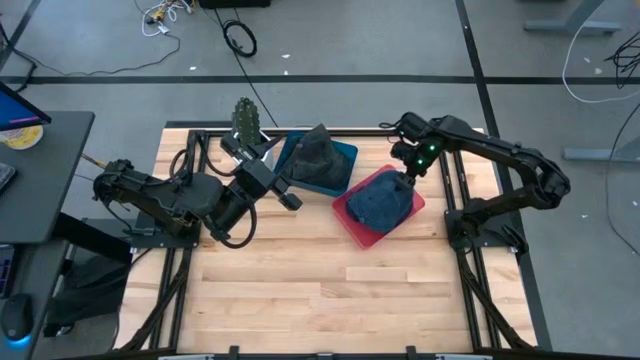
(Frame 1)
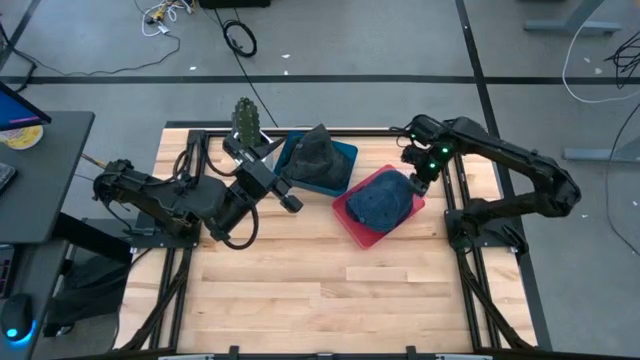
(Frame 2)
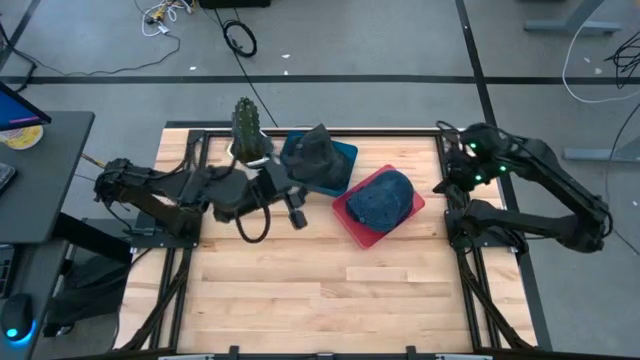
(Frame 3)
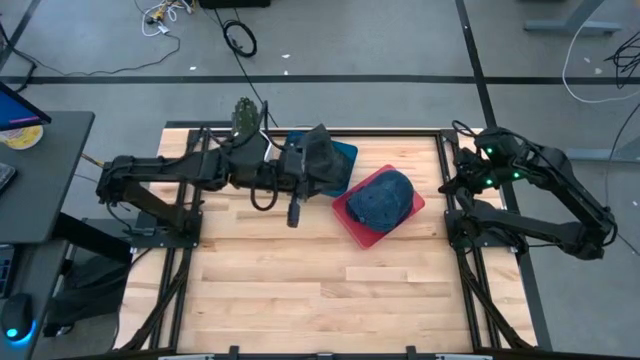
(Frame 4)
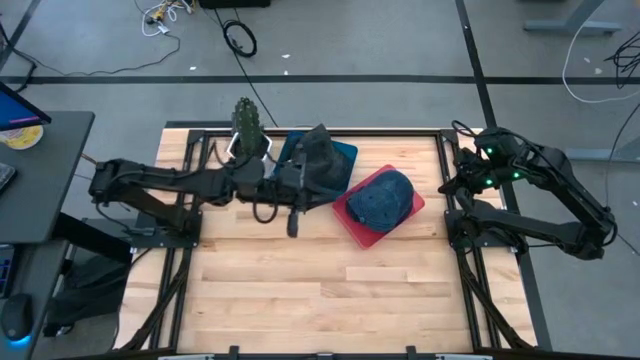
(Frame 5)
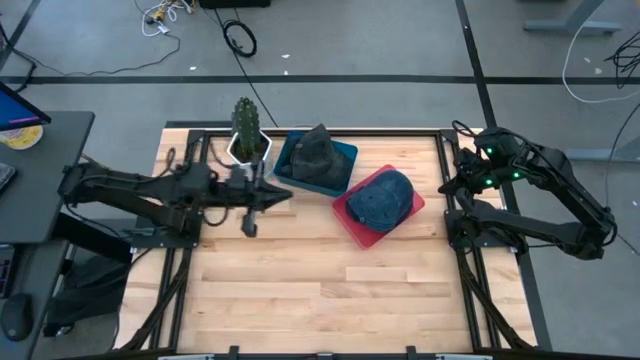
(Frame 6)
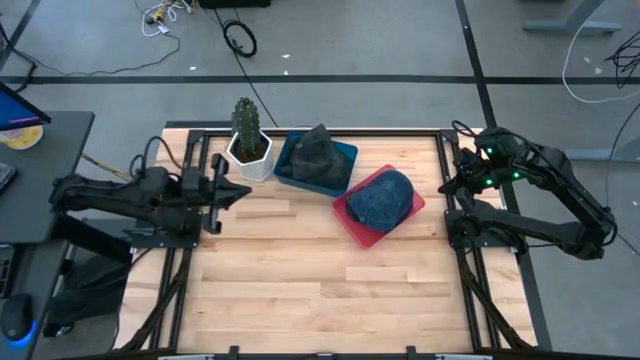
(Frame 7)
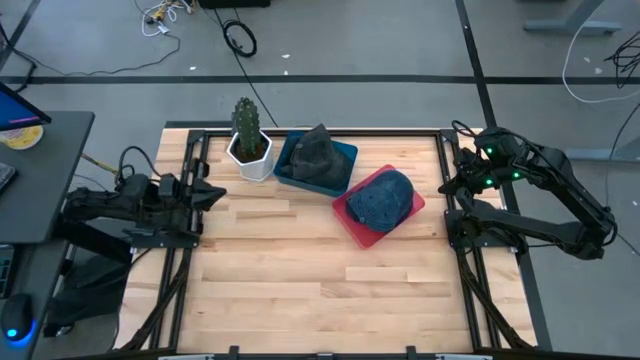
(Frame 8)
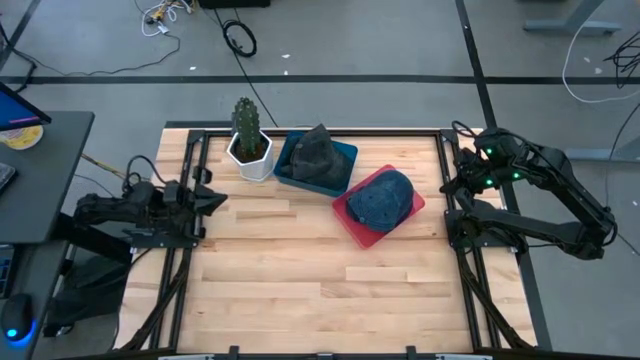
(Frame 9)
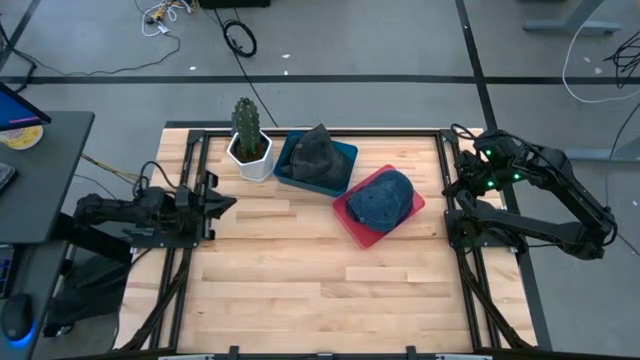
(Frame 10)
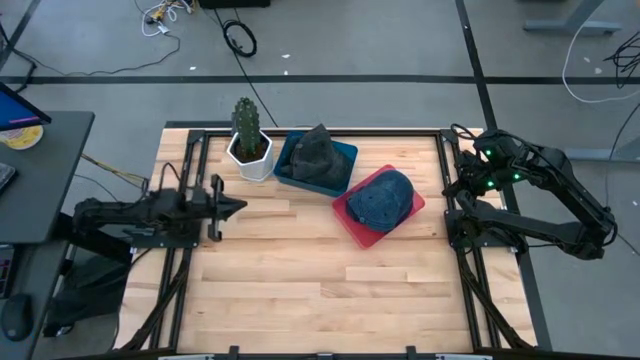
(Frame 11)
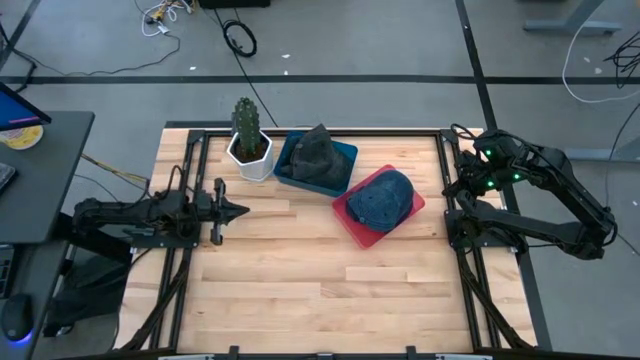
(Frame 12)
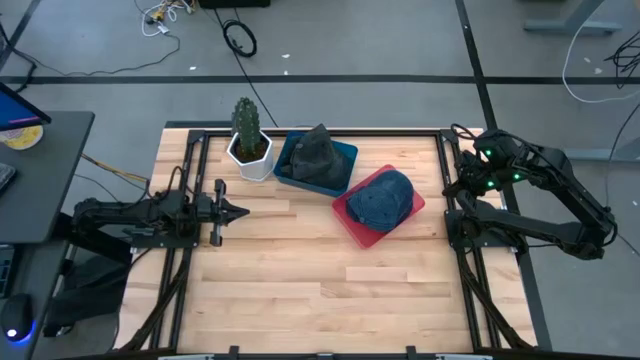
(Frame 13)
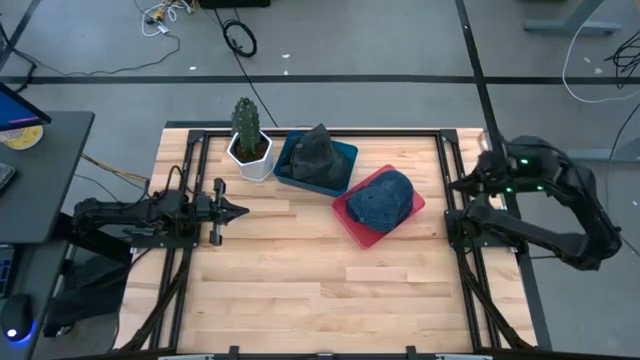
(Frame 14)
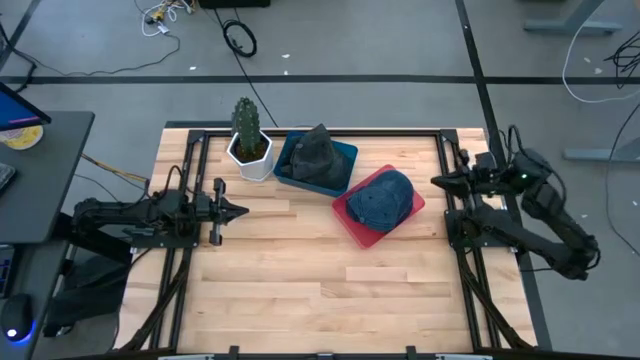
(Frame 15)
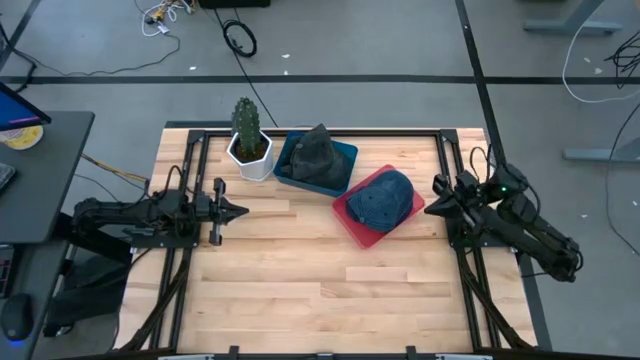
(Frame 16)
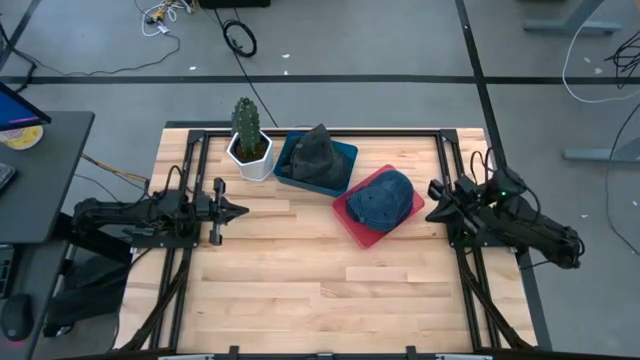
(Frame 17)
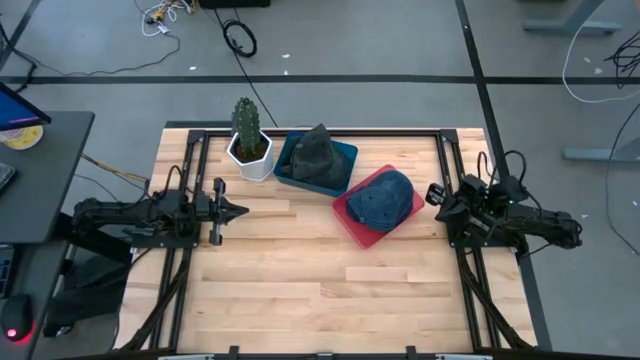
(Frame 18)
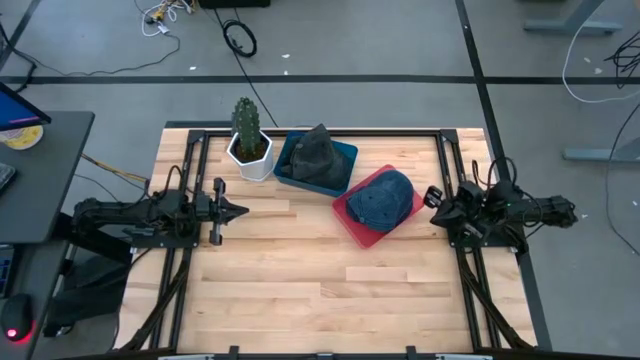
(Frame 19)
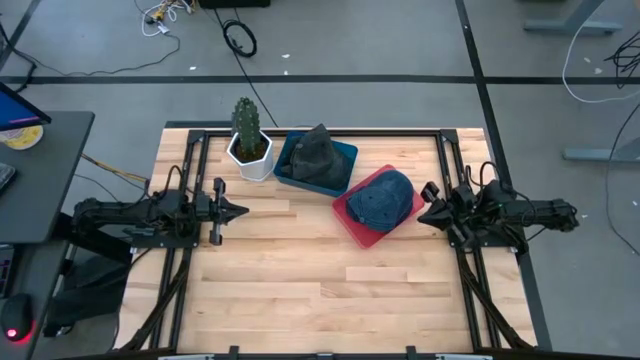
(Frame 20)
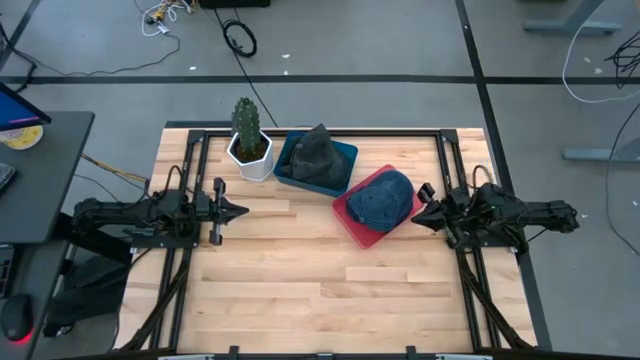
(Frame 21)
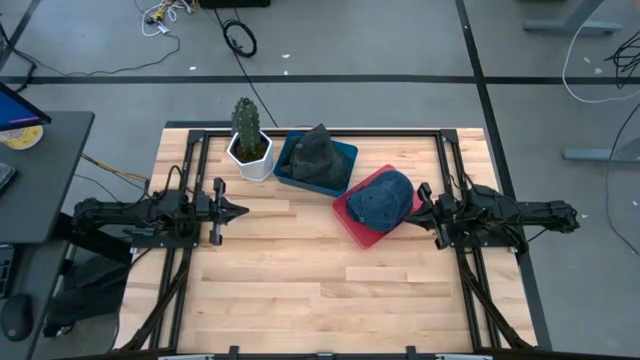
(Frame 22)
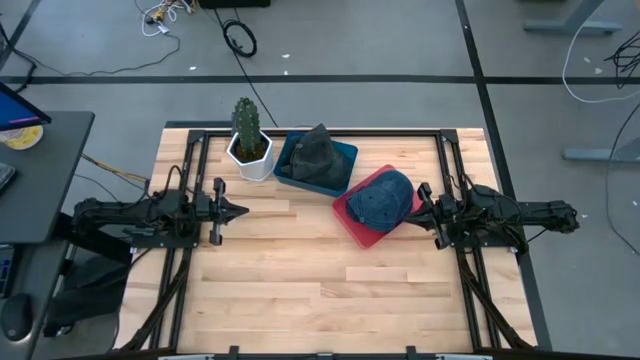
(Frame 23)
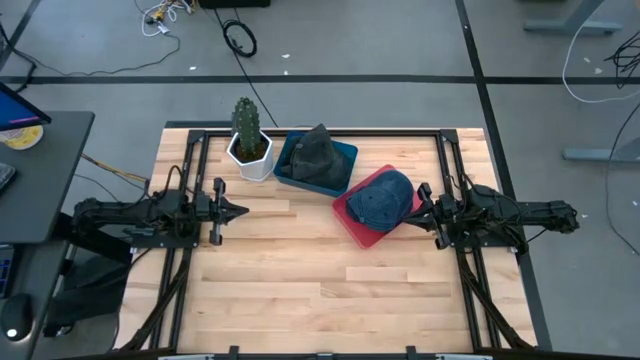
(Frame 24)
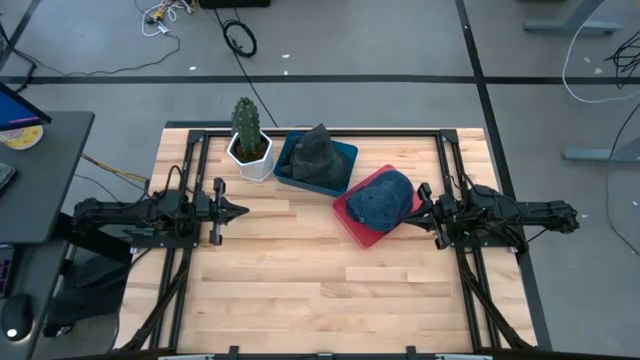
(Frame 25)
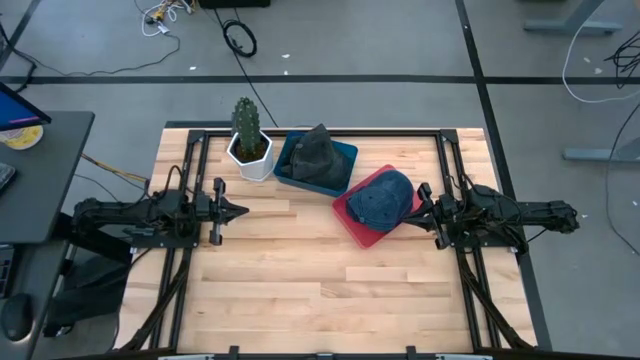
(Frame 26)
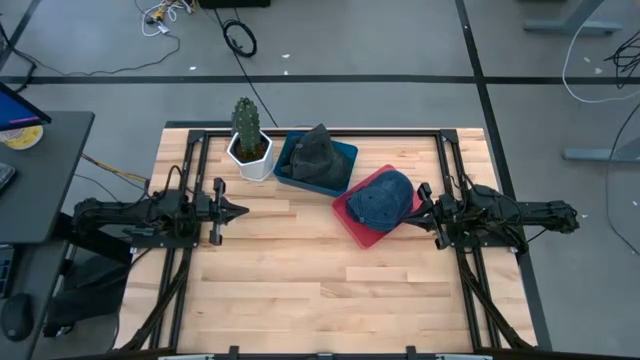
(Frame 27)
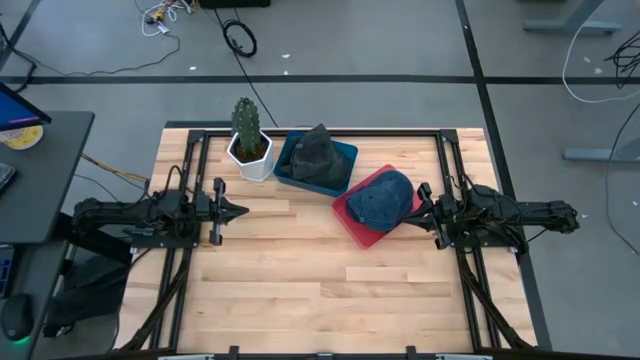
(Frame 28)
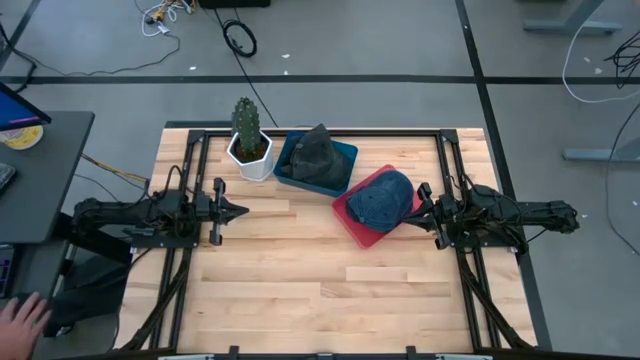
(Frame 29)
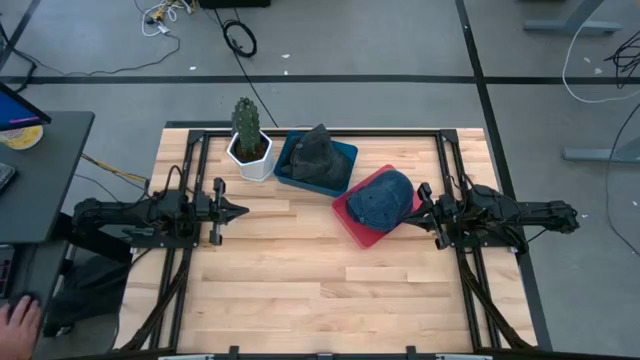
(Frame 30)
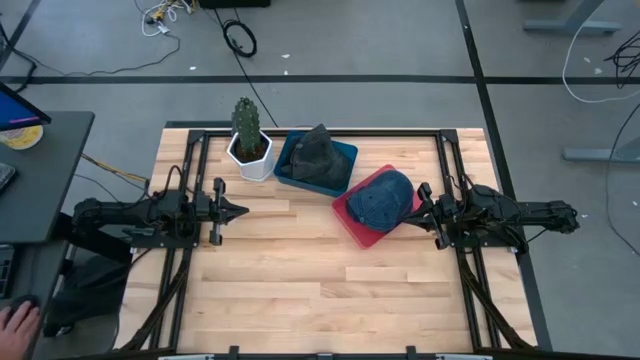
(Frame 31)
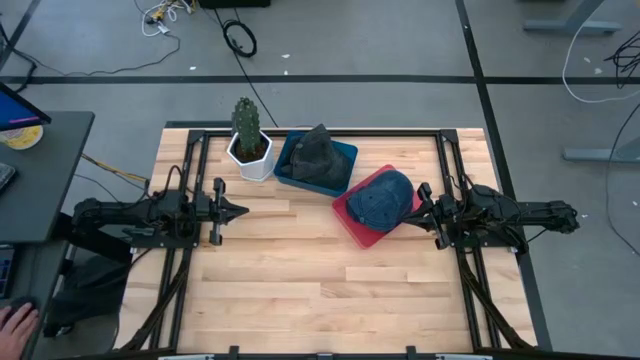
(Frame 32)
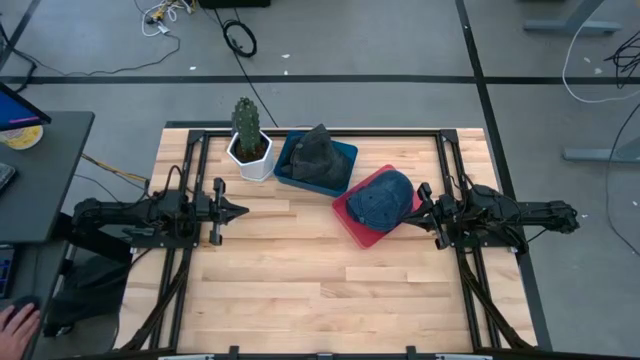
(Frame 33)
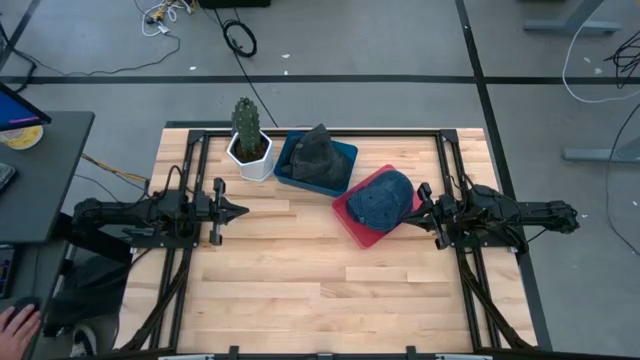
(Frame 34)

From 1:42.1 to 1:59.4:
Task: Pick & Place hat
Return to Home Position

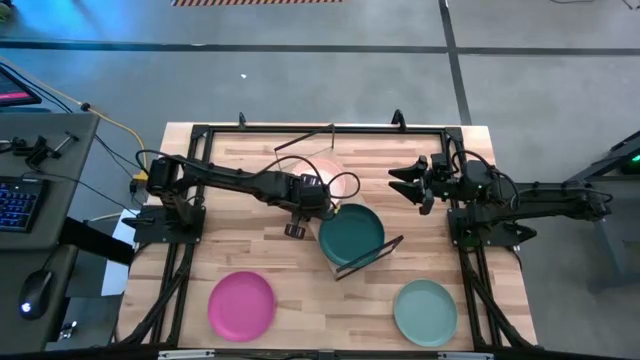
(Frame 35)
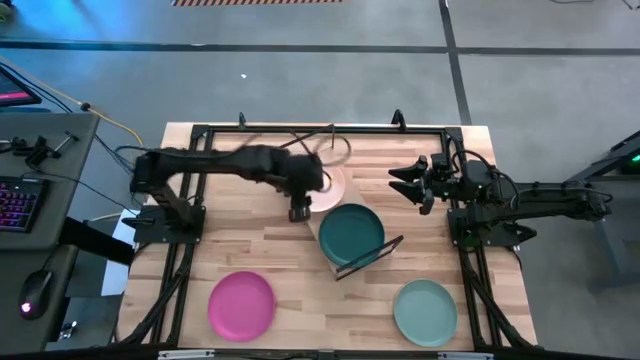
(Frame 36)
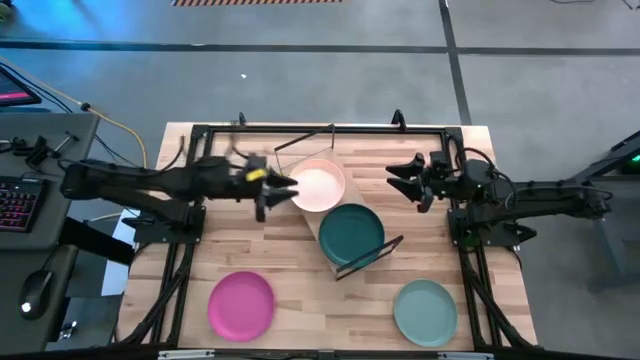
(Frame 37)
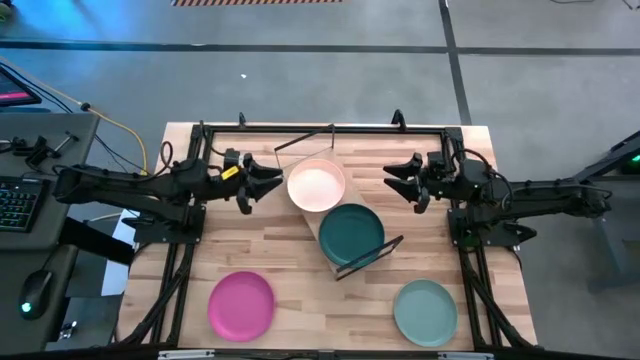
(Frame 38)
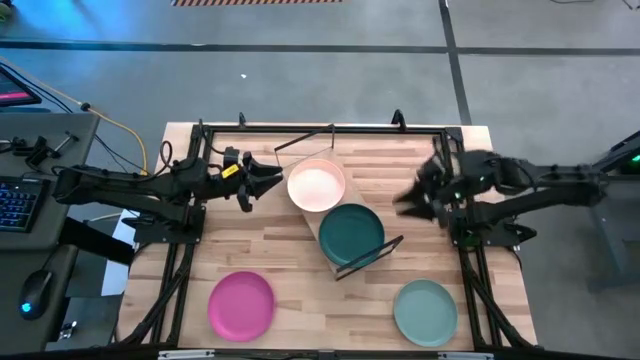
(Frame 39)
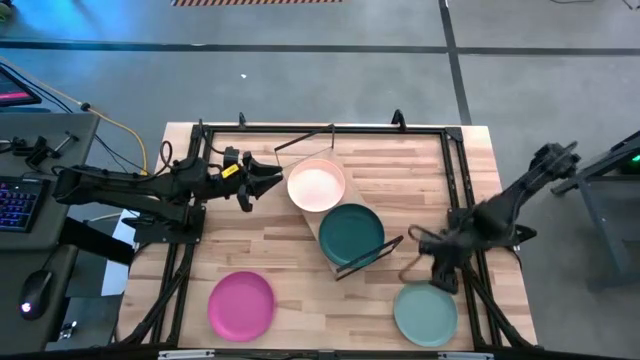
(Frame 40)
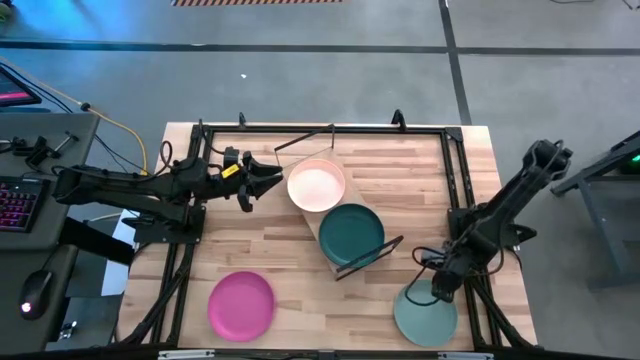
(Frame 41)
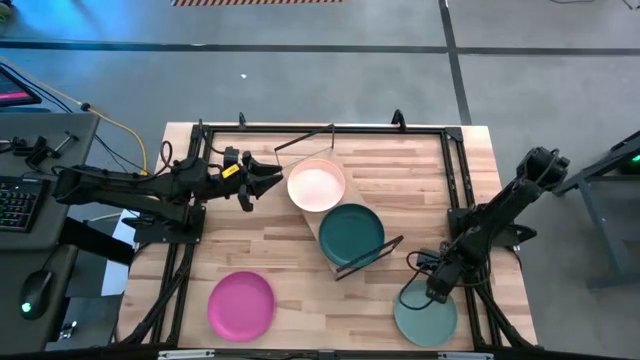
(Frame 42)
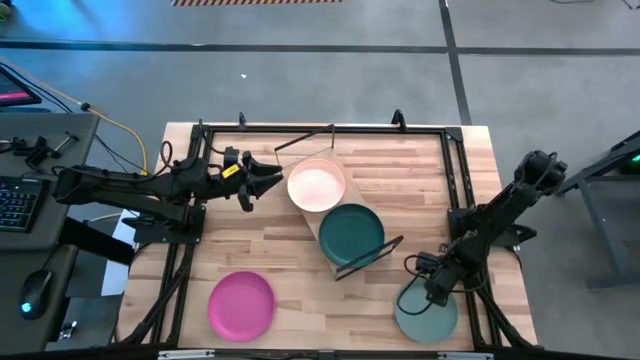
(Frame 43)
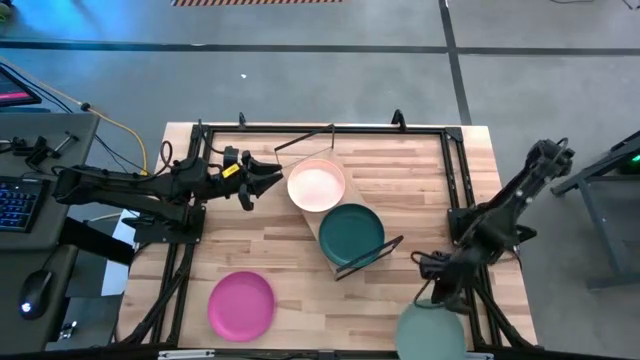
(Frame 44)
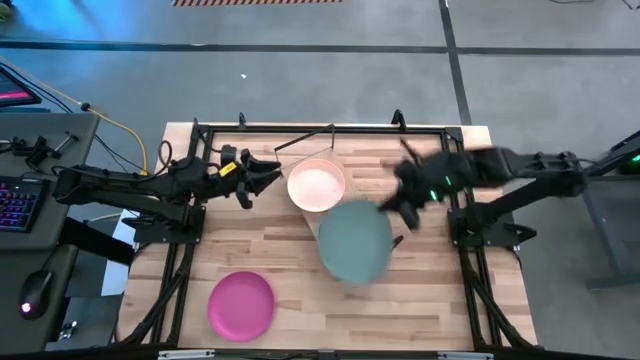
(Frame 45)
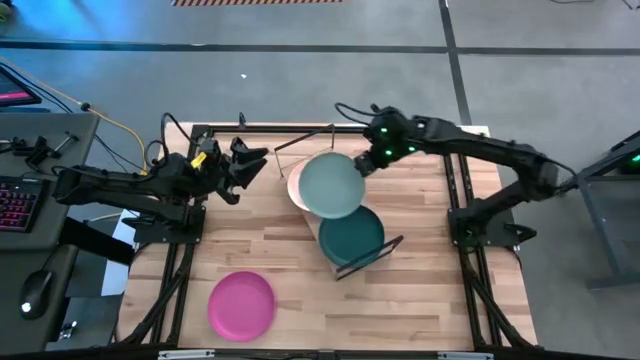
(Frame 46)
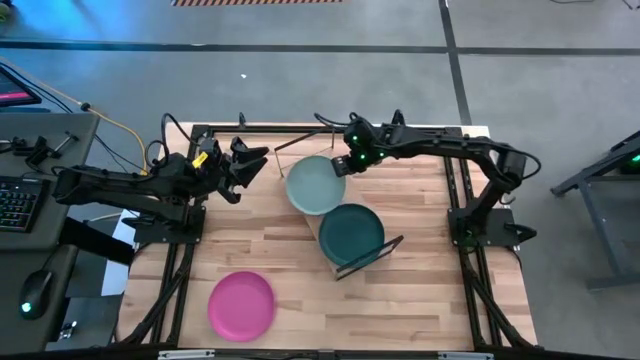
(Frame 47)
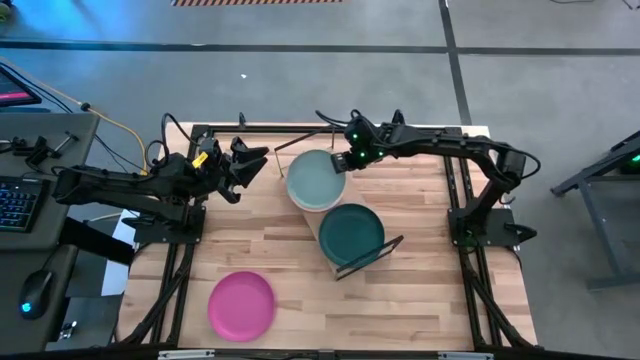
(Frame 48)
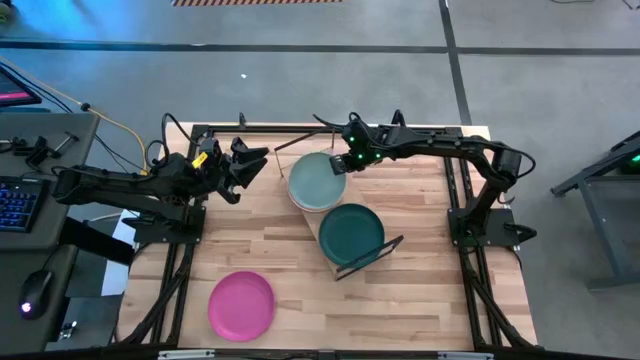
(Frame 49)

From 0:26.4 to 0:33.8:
Task: Place and stack plates onto a shelf
Stack the gray plate on top of the light brown plate on the shelf
